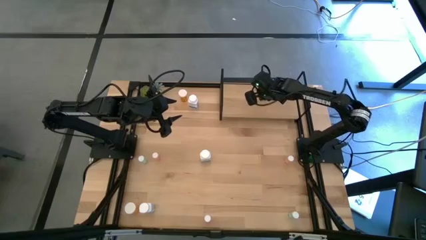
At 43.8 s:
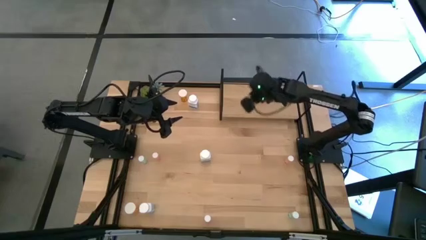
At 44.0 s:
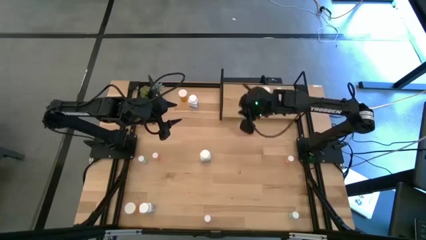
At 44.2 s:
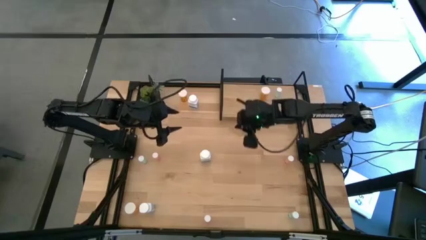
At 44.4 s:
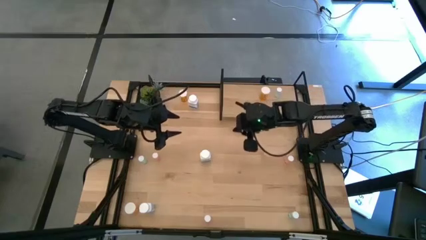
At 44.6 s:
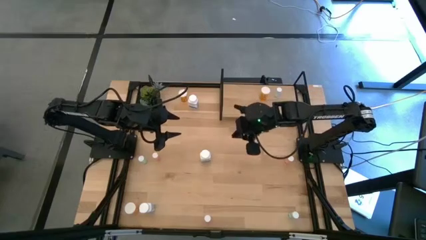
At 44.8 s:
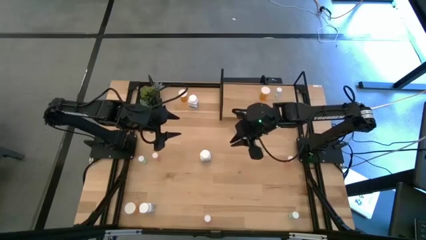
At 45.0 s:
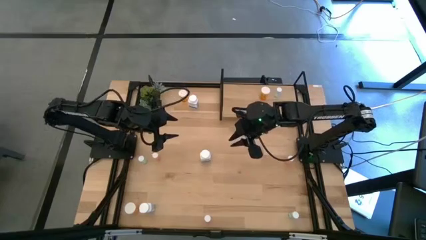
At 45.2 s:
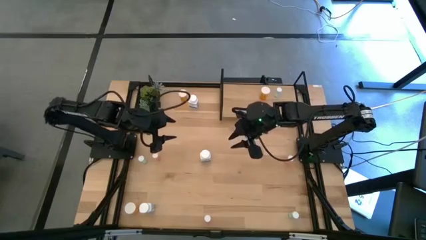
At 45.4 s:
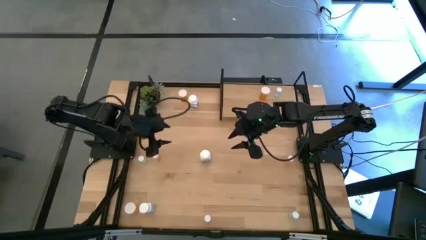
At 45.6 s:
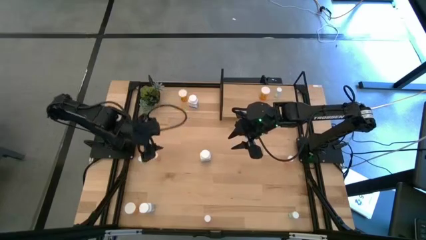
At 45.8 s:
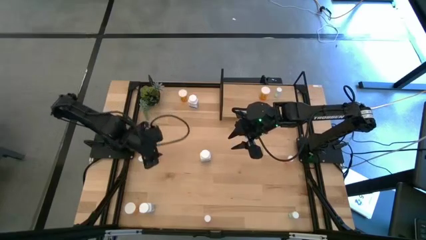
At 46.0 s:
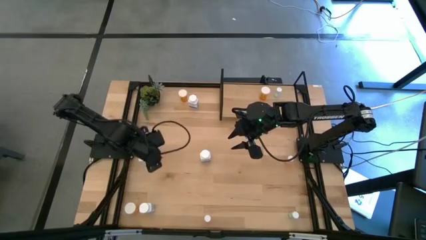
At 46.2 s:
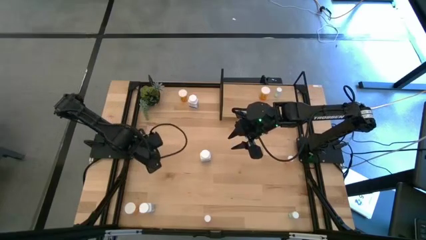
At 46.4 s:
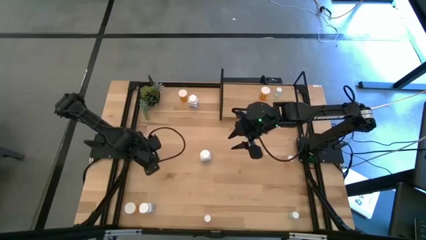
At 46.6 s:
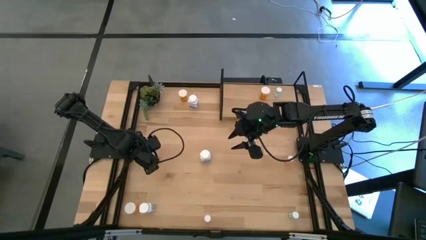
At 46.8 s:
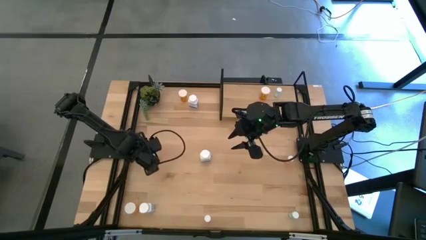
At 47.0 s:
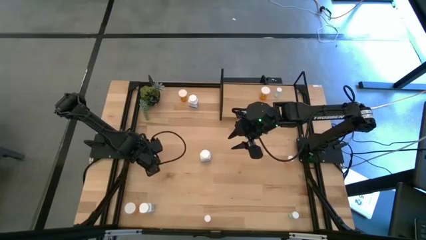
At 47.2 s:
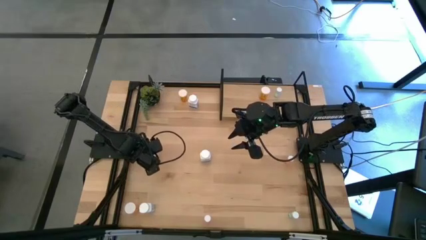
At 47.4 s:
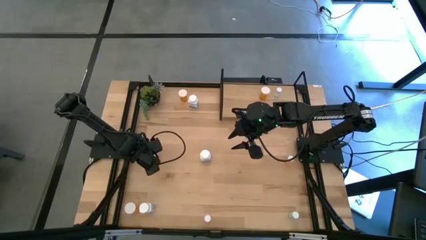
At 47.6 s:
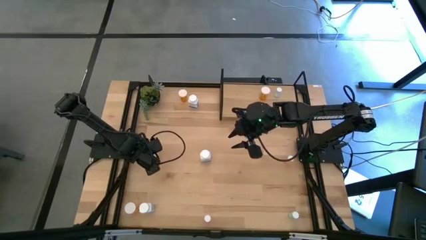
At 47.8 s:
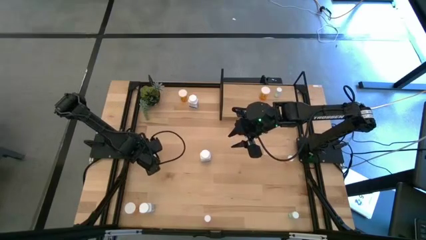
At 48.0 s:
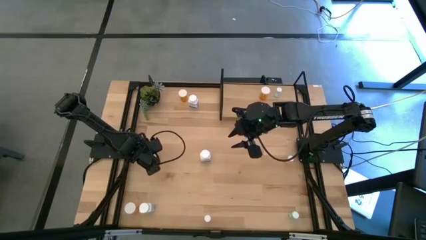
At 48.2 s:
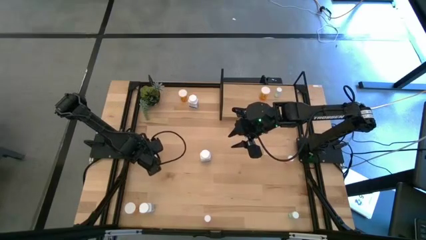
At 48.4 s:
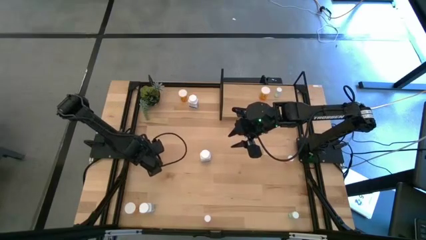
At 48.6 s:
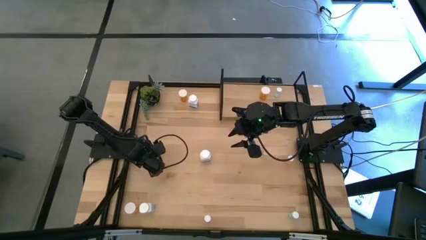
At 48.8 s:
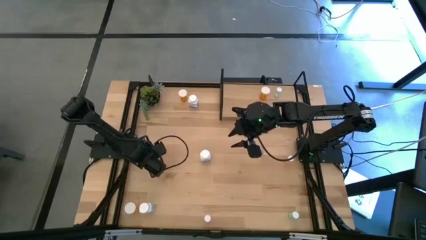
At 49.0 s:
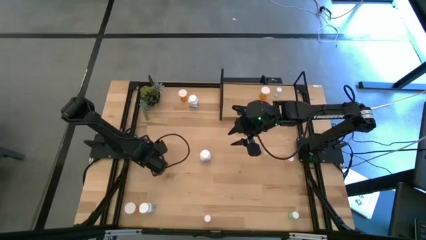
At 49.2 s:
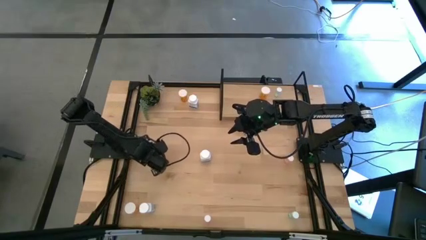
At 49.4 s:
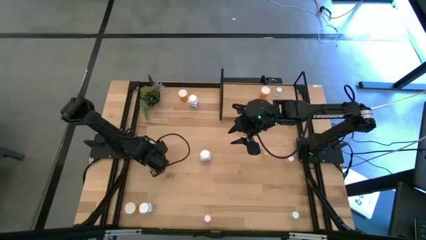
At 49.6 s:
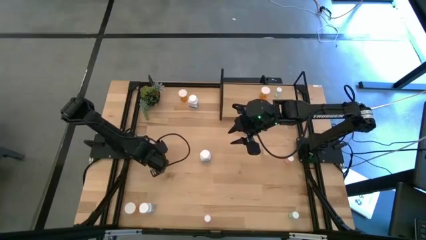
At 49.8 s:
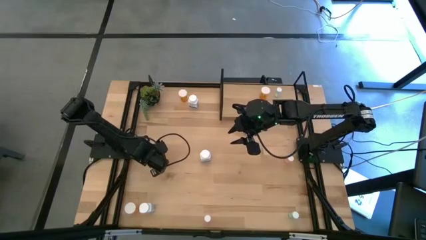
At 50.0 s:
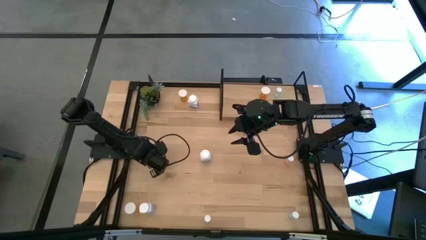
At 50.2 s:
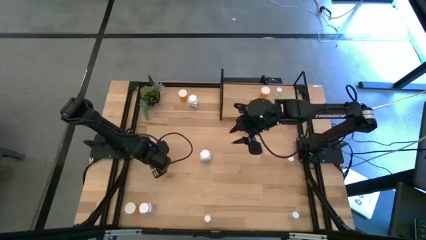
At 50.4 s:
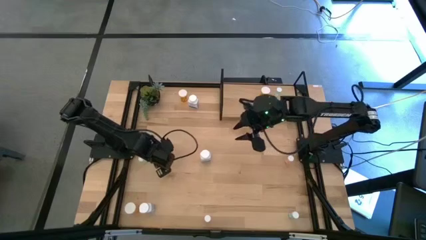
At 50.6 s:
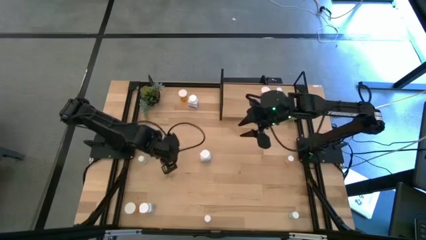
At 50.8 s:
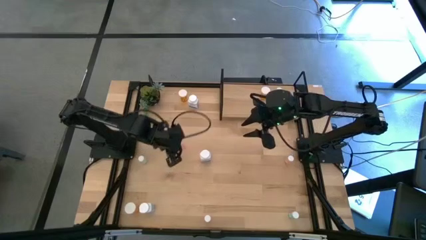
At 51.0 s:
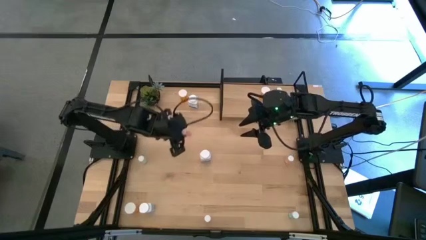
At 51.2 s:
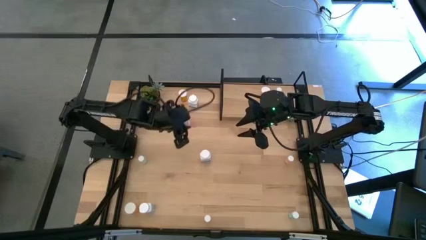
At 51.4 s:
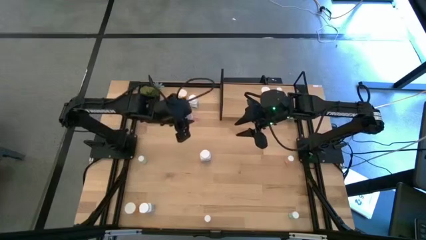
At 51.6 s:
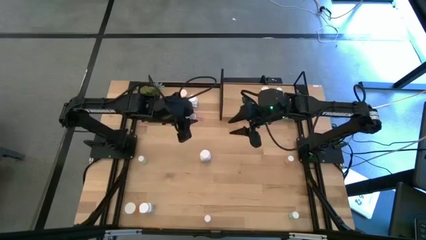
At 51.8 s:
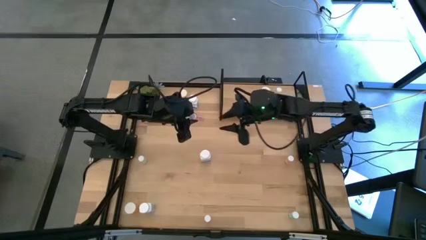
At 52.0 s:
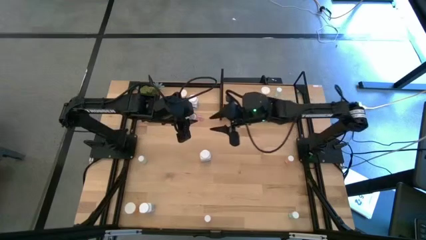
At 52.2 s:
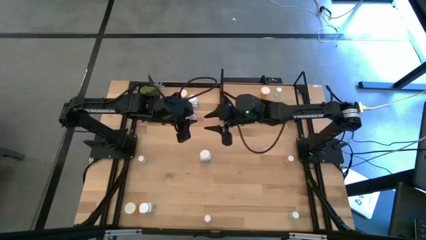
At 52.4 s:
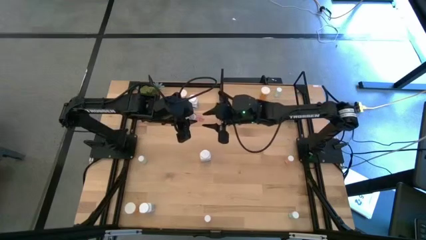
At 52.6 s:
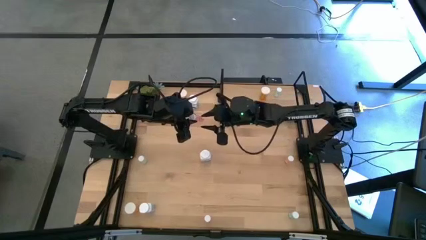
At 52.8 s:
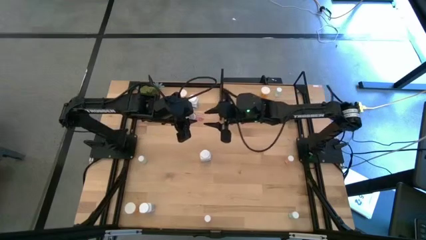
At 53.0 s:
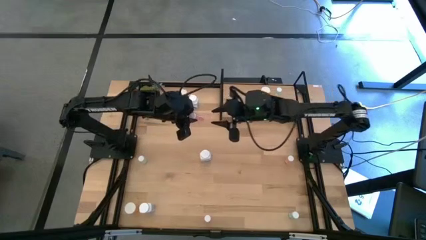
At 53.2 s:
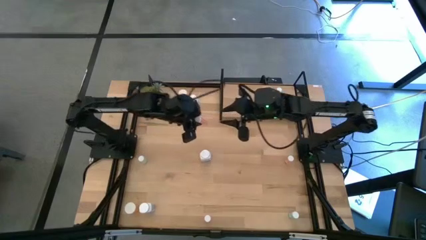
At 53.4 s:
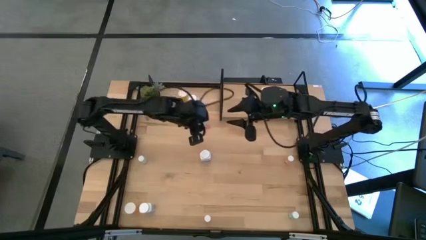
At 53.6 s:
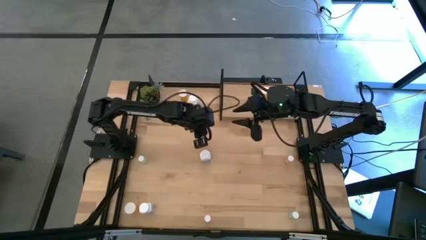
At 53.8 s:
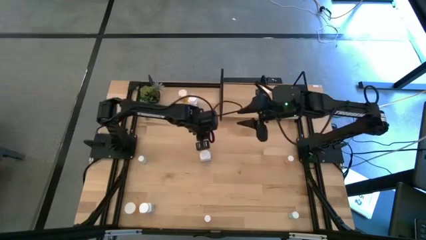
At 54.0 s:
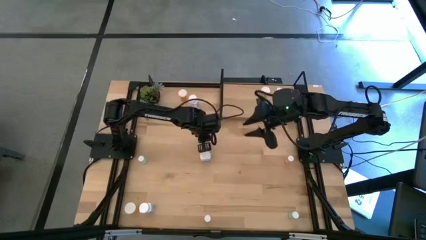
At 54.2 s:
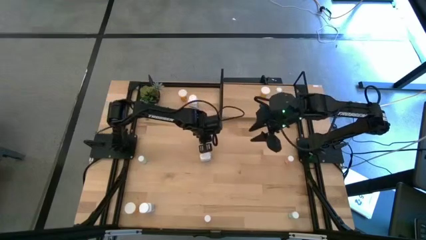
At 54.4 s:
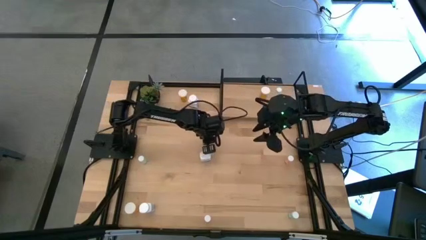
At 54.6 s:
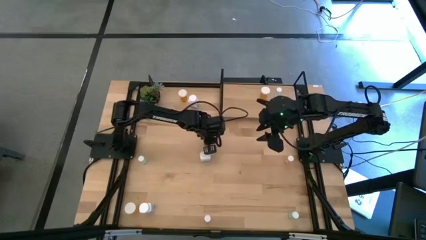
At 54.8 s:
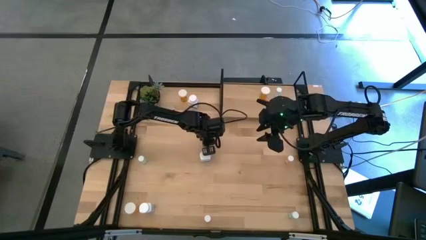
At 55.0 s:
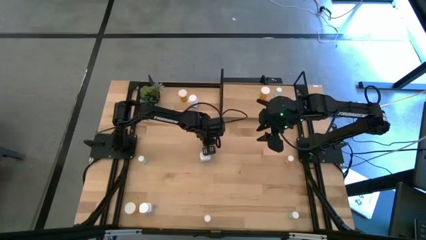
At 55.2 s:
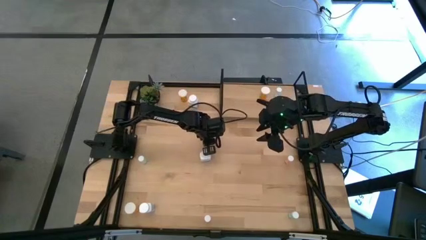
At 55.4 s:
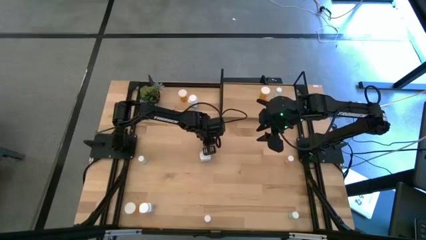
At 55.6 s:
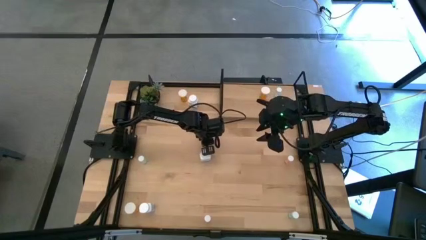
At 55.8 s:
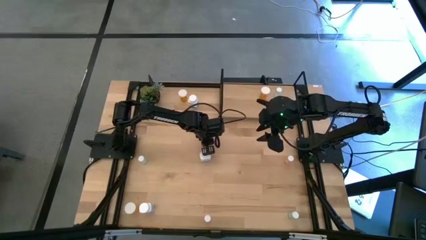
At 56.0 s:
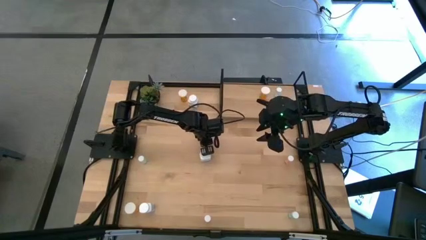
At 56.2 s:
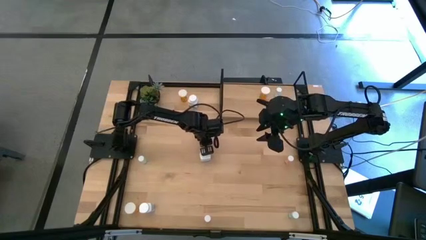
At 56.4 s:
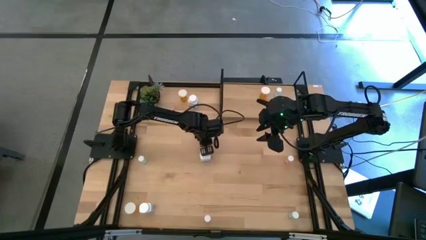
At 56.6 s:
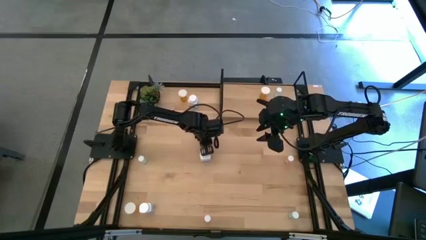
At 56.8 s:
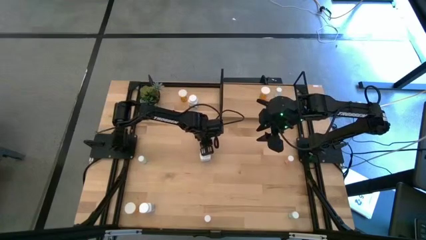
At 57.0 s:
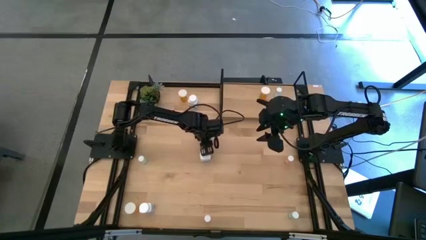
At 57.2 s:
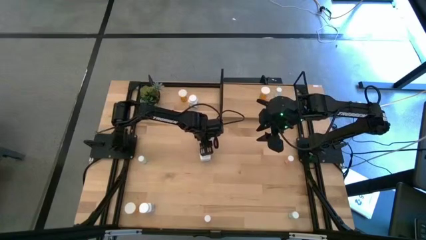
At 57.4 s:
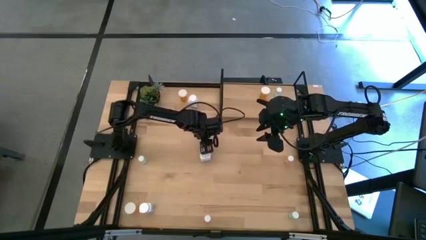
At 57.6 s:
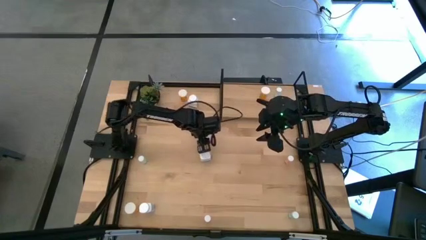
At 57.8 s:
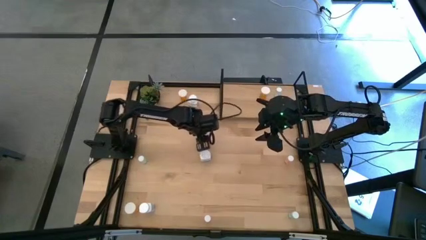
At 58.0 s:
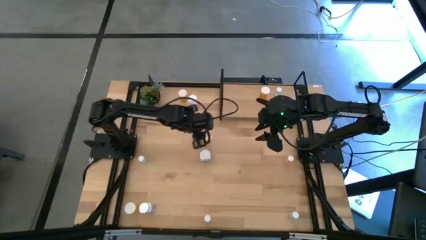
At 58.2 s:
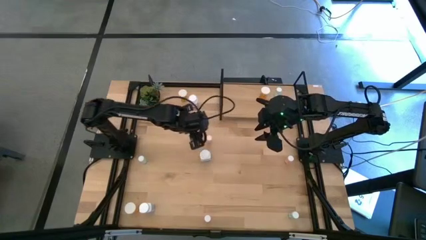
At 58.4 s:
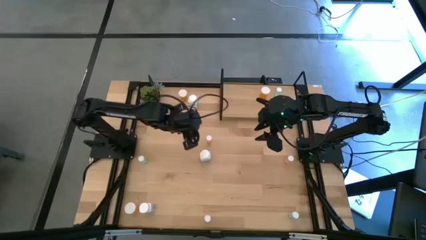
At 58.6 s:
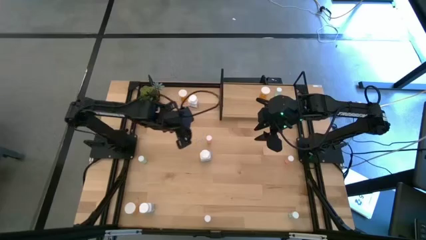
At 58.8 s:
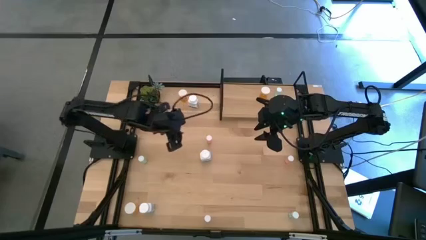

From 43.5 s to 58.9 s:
Task: Pick and place medicine bottles onto shelf by color
Put the top left pink pill bottle on the shelf
